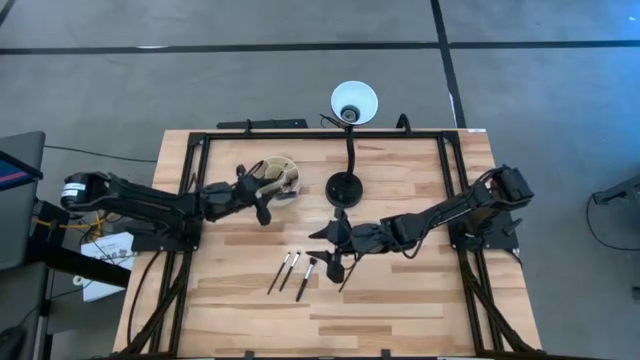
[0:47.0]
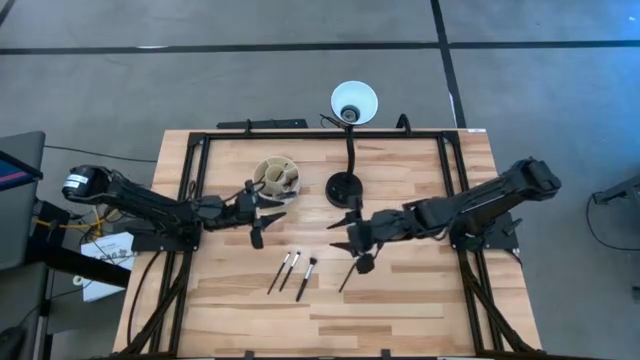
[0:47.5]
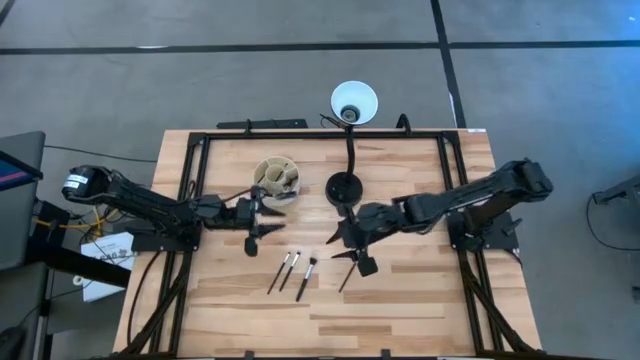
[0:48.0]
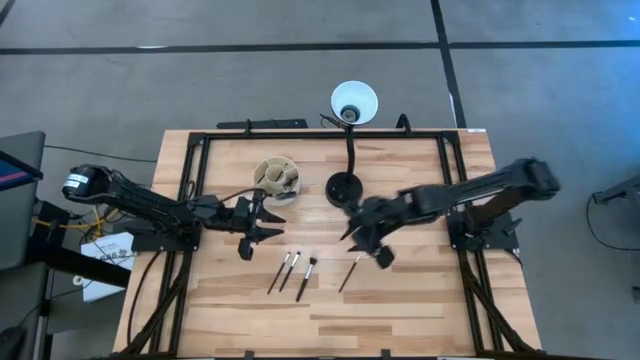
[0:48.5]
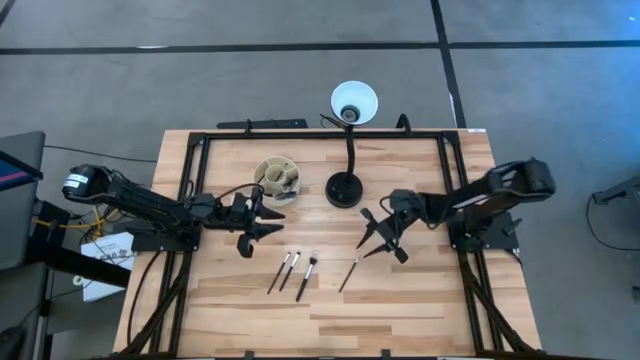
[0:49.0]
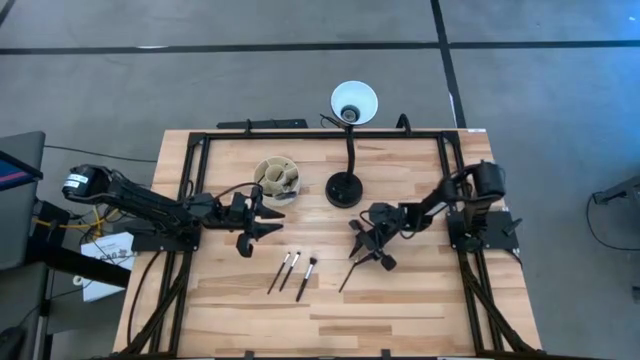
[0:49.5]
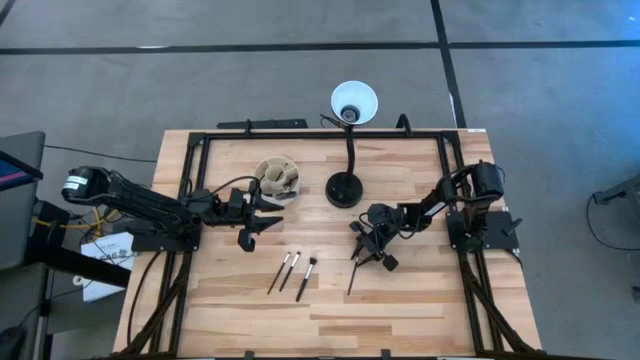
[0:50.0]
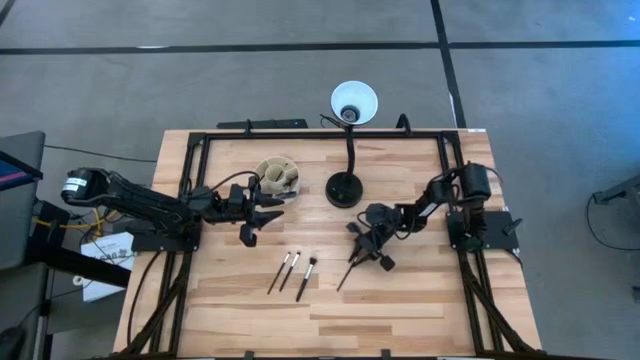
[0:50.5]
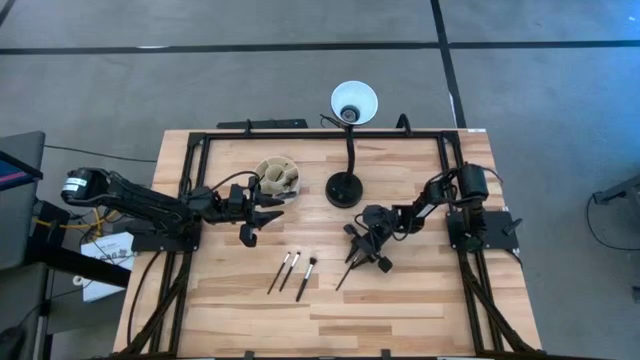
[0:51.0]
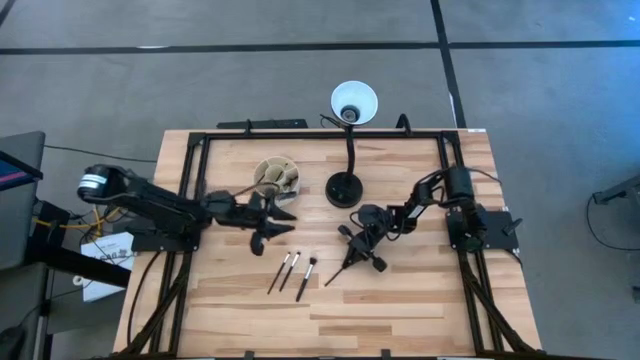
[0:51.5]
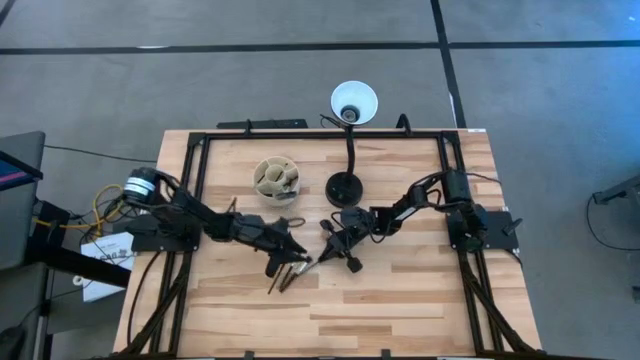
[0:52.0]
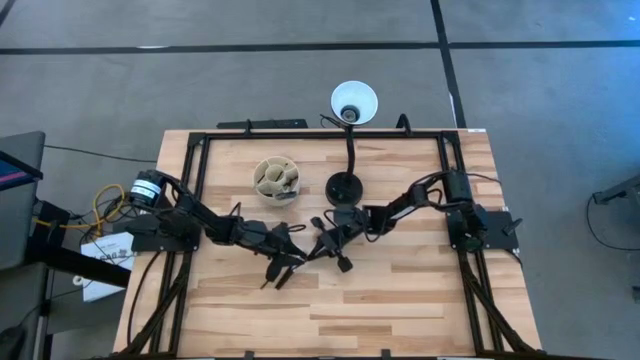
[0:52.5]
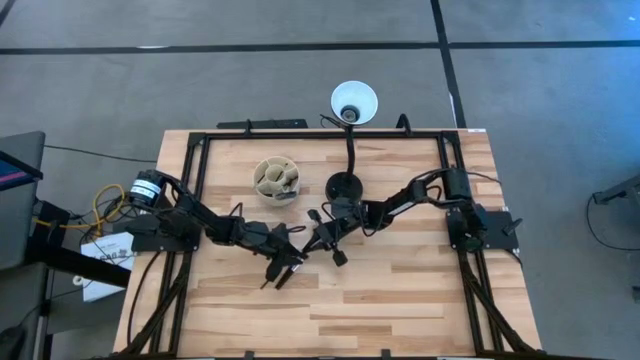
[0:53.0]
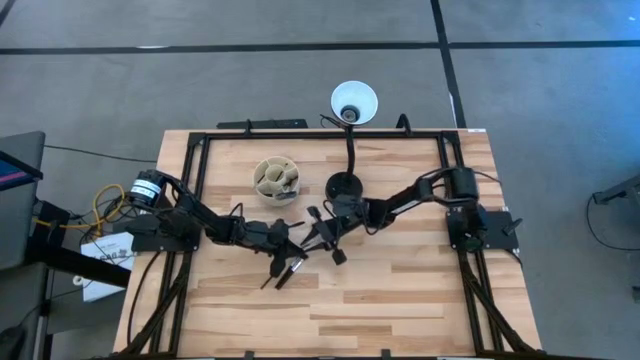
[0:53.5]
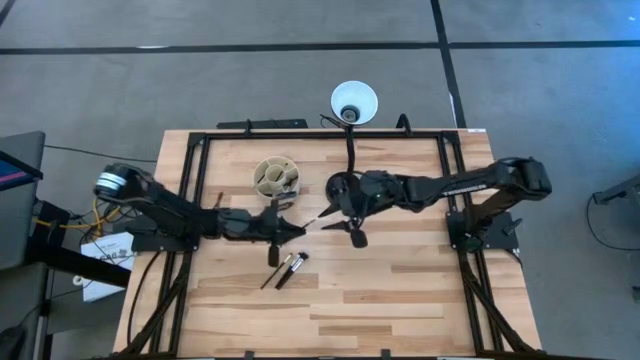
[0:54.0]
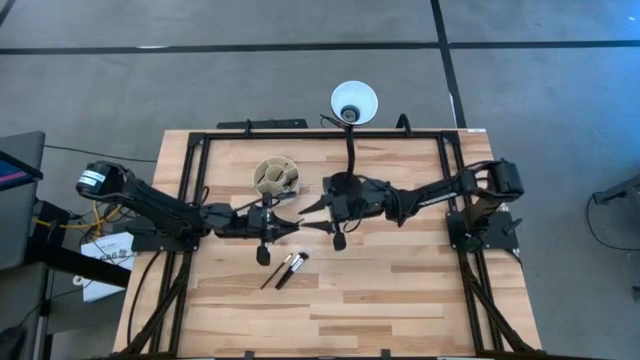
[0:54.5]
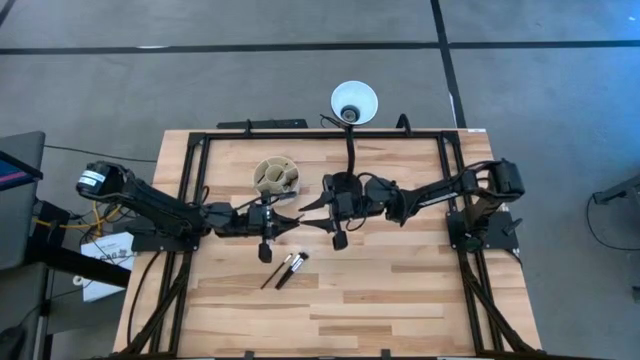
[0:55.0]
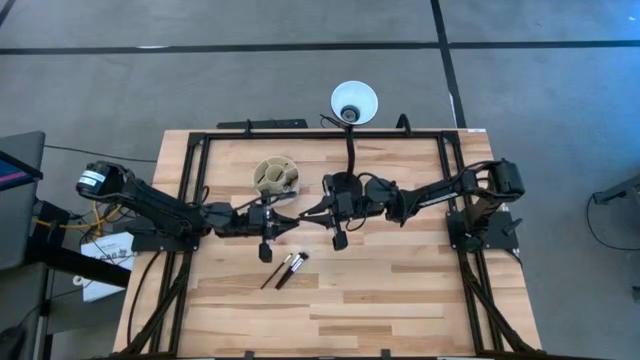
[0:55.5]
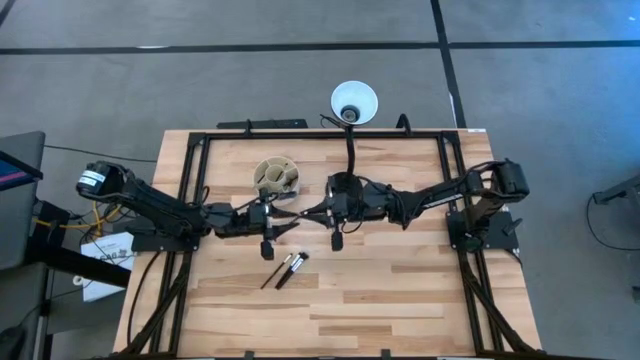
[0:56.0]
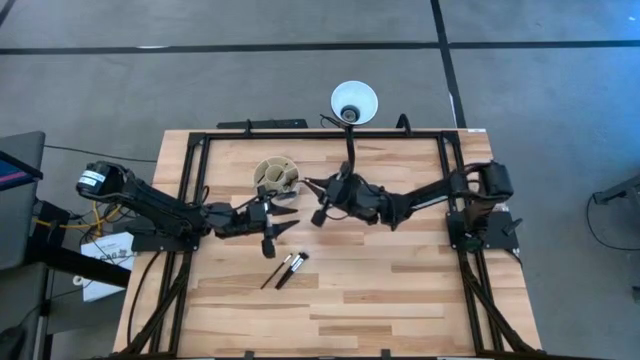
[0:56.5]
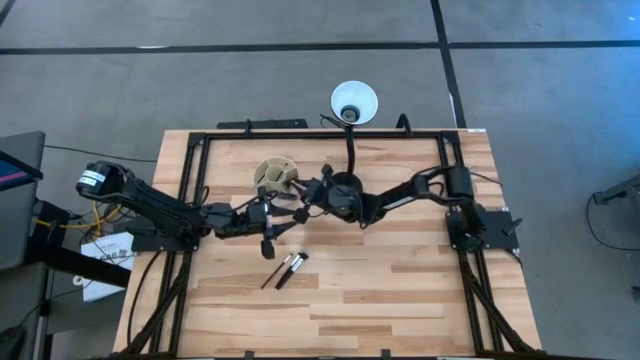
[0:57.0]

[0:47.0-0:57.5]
Task: Put items in baskets/containers
Put the eyeshadow brush into the organizer

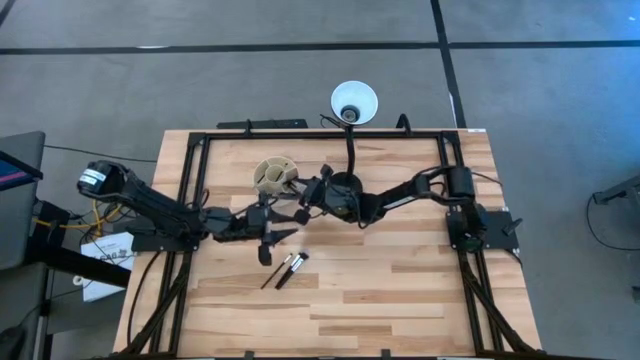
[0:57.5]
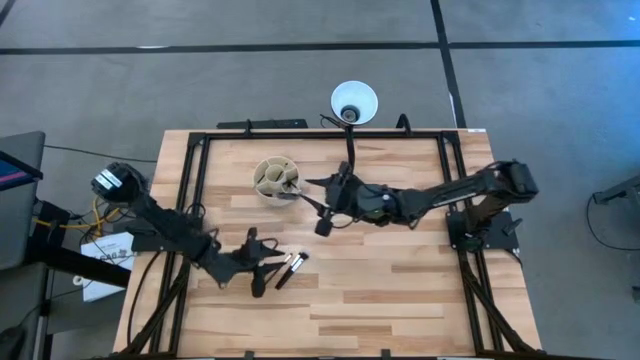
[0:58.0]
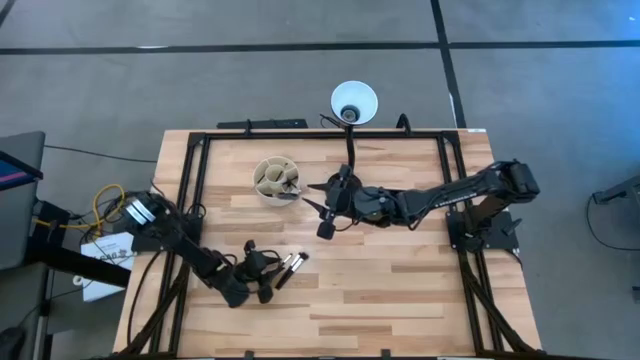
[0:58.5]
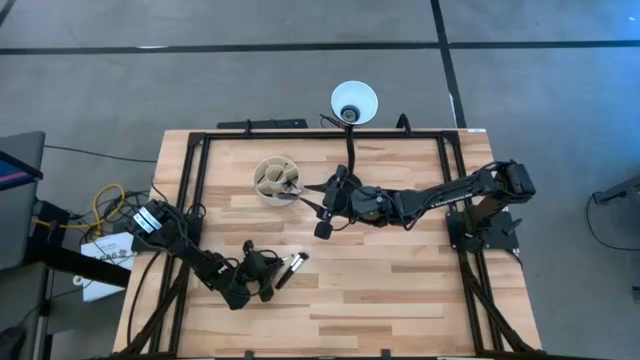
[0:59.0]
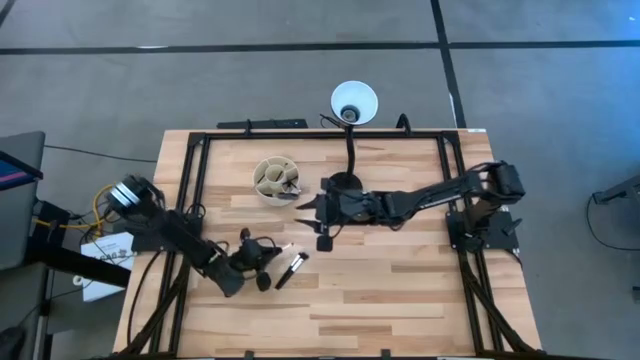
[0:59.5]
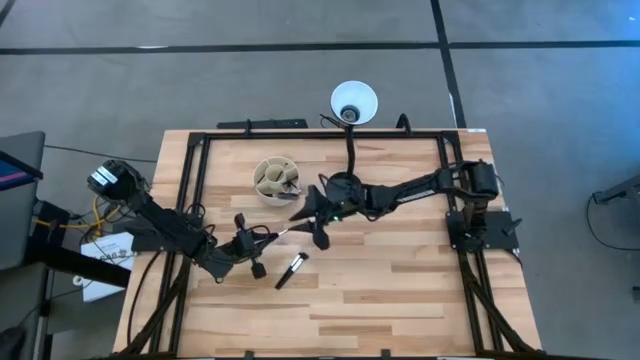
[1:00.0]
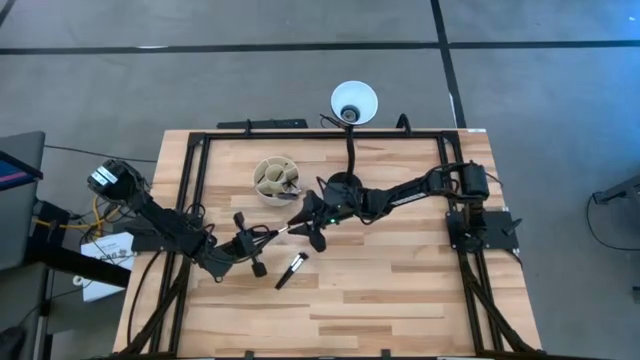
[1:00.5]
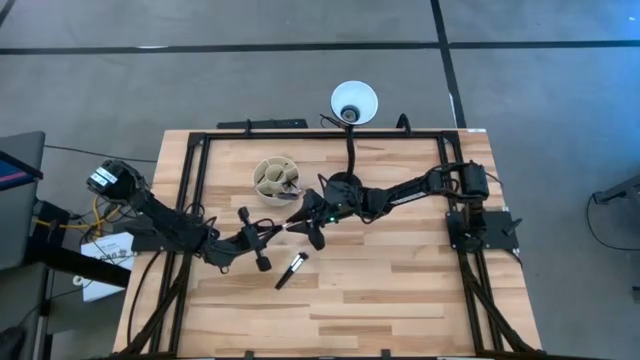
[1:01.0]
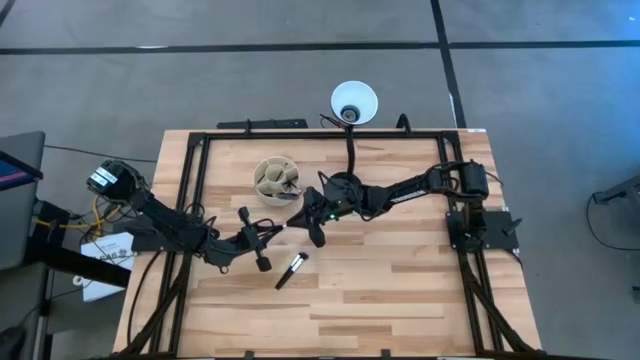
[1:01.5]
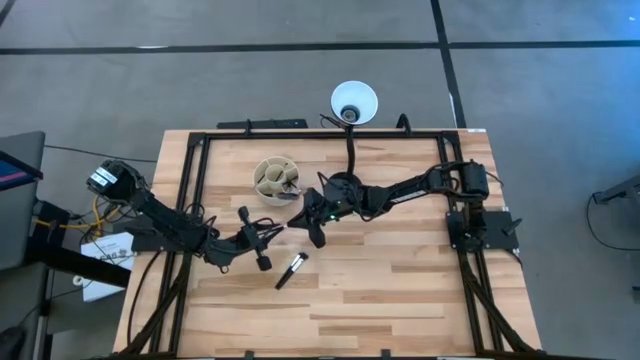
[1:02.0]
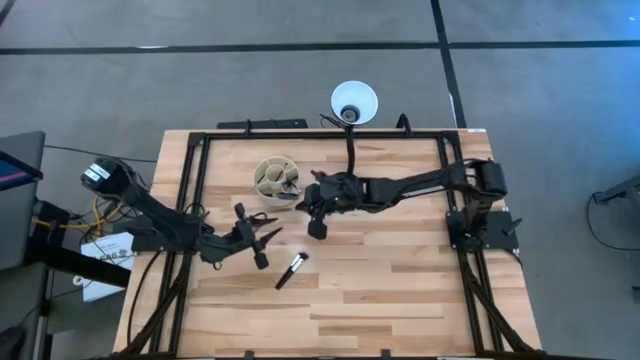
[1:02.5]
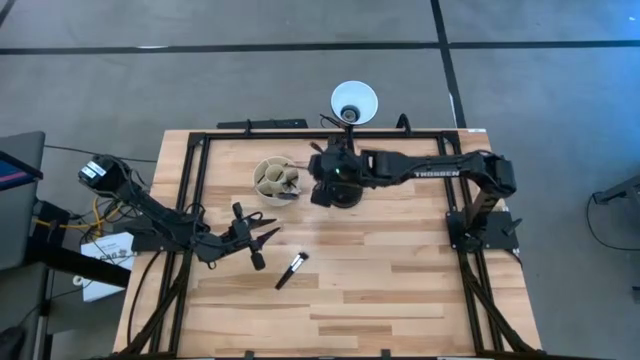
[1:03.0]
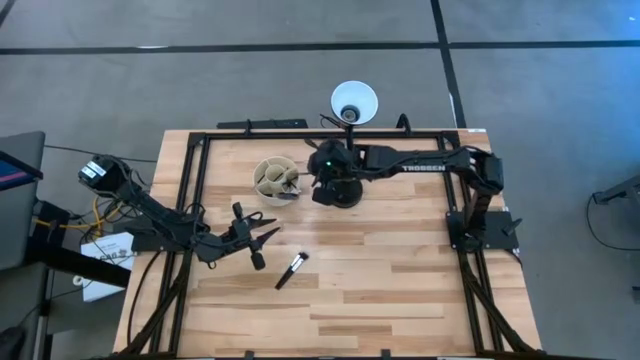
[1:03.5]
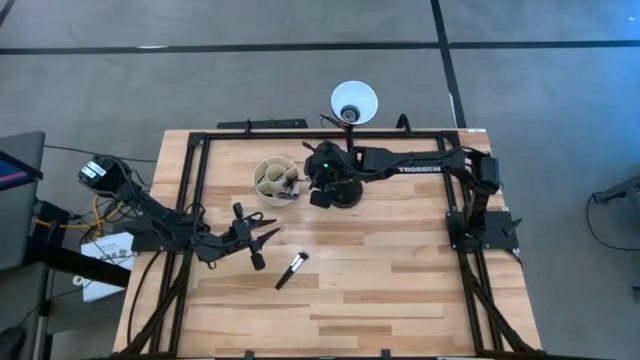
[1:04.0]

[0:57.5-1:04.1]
Put the eyeshadow brush into the organizer

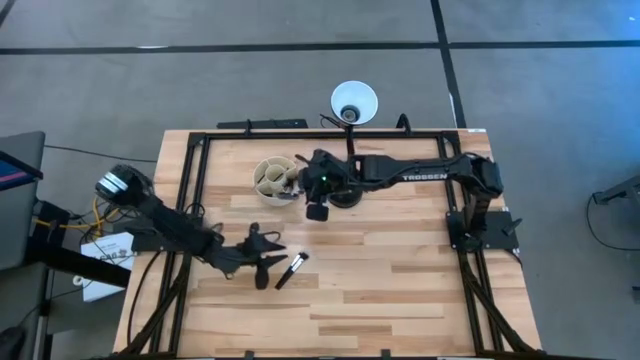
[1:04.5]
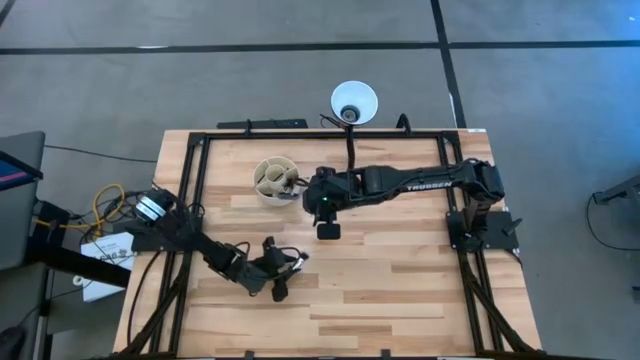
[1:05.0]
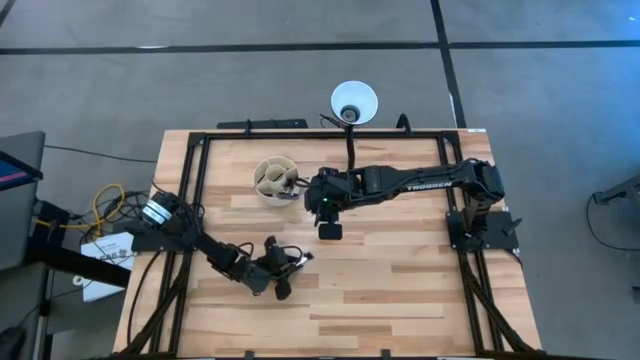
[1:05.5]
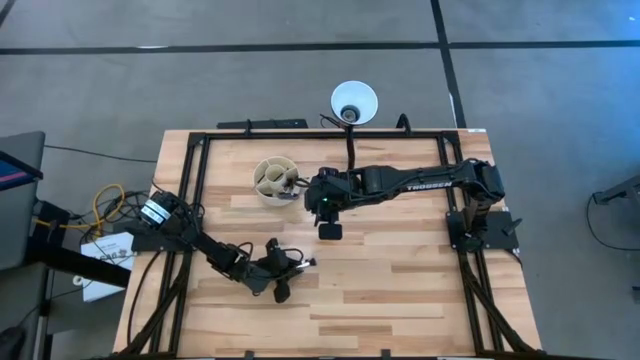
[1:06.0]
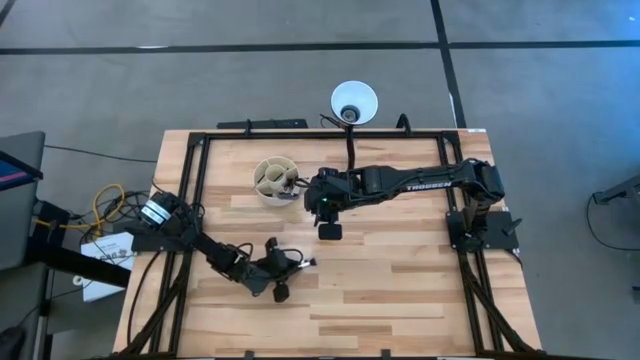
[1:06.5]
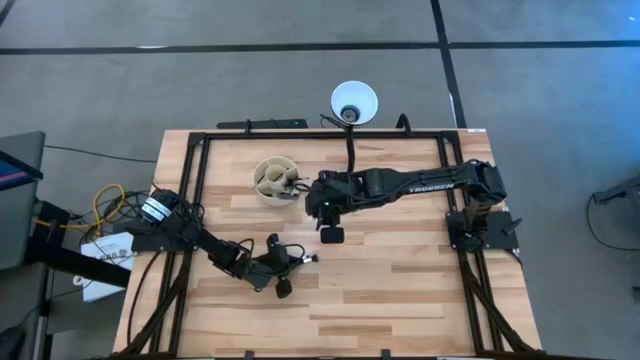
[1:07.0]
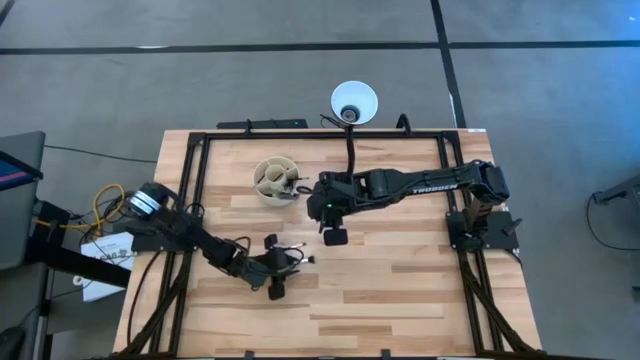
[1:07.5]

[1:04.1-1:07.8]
Put the blush brush into the organizer
